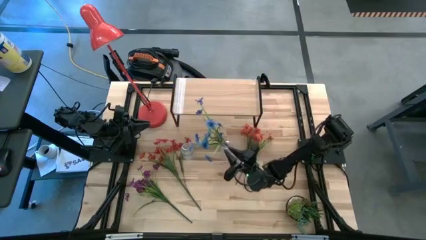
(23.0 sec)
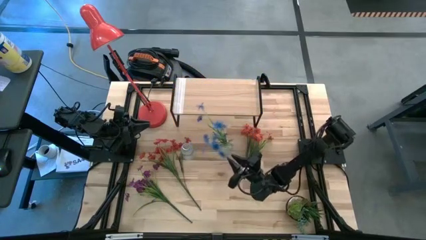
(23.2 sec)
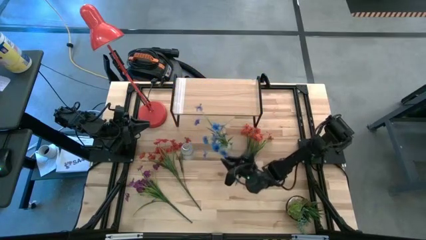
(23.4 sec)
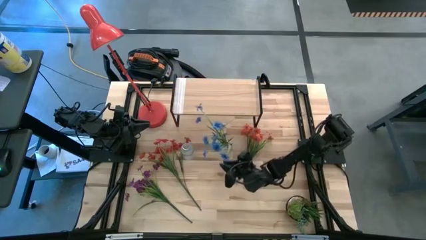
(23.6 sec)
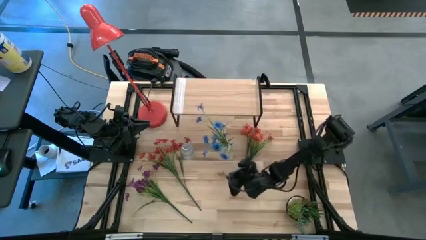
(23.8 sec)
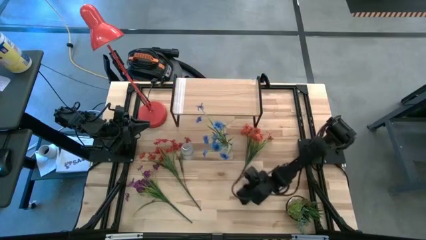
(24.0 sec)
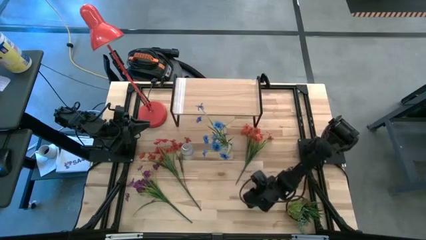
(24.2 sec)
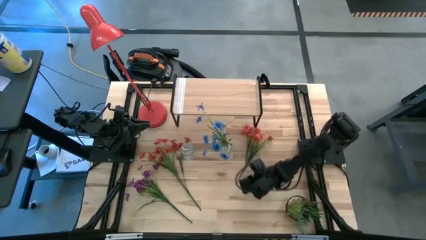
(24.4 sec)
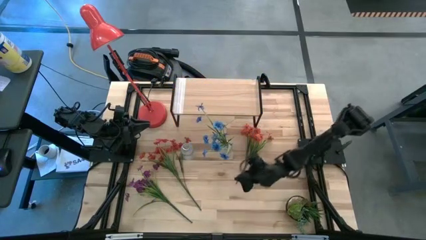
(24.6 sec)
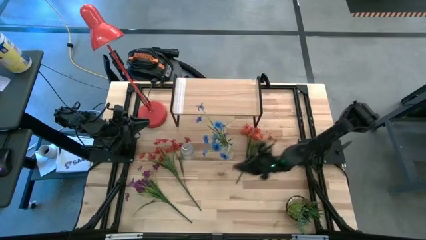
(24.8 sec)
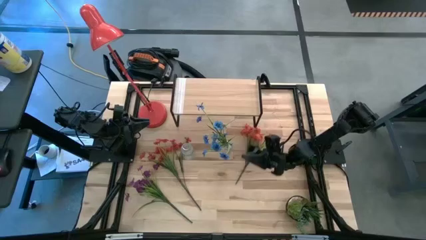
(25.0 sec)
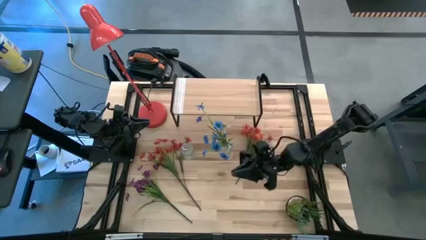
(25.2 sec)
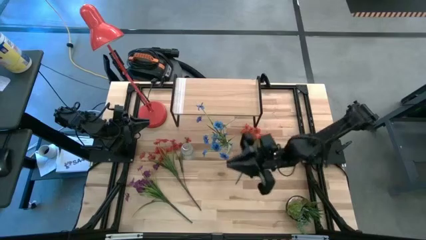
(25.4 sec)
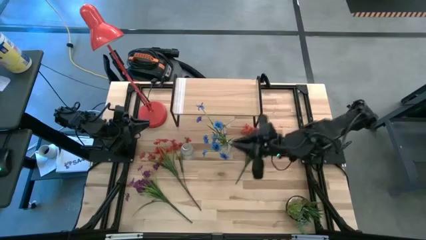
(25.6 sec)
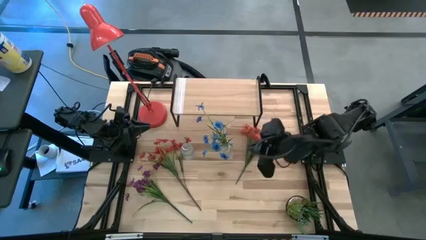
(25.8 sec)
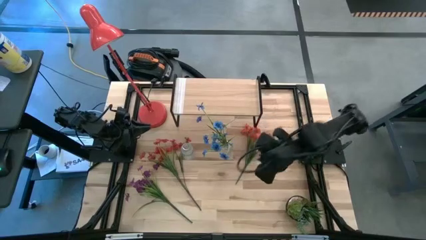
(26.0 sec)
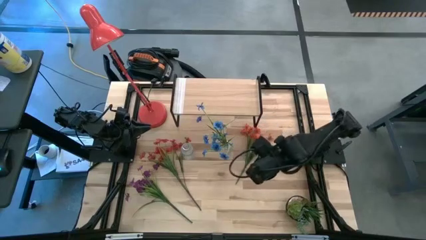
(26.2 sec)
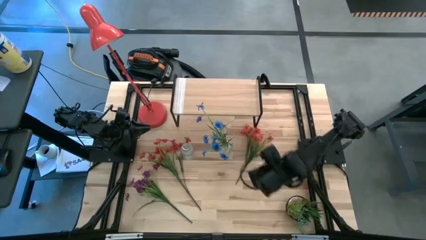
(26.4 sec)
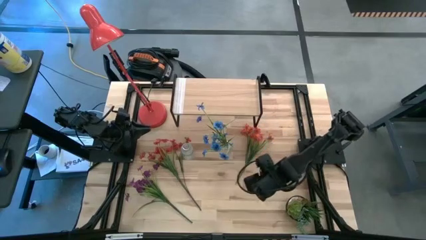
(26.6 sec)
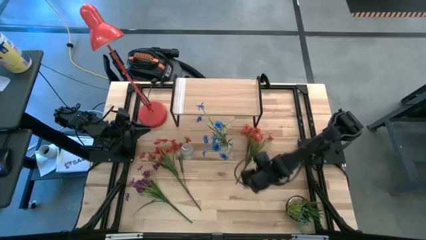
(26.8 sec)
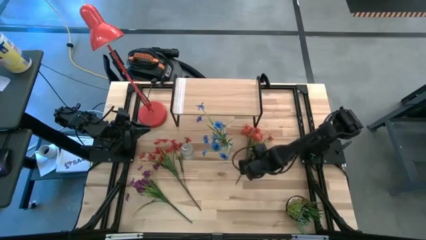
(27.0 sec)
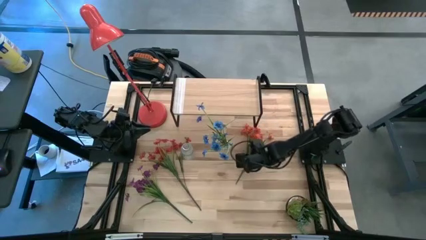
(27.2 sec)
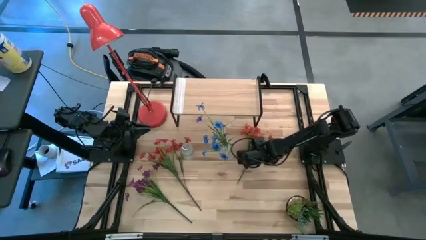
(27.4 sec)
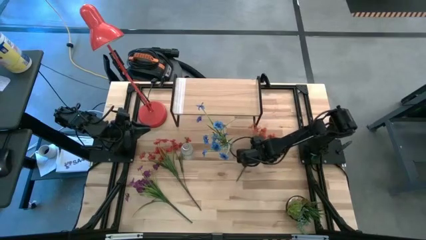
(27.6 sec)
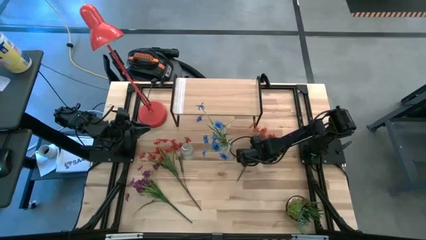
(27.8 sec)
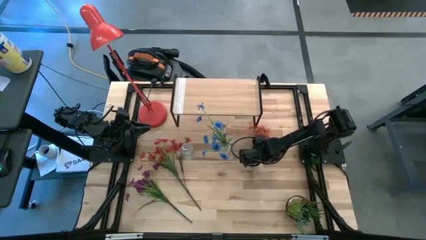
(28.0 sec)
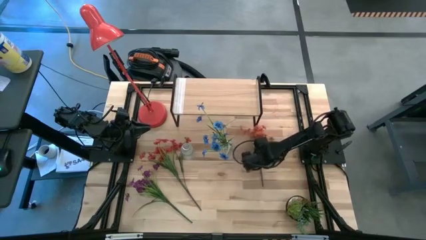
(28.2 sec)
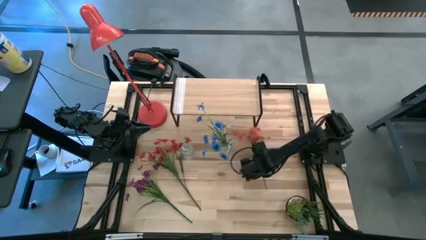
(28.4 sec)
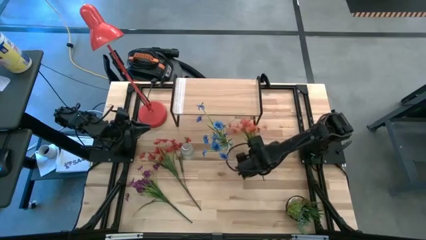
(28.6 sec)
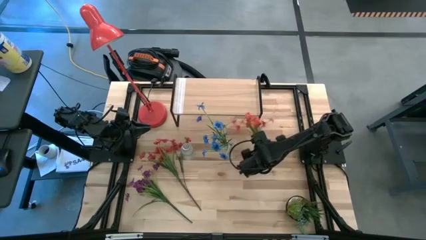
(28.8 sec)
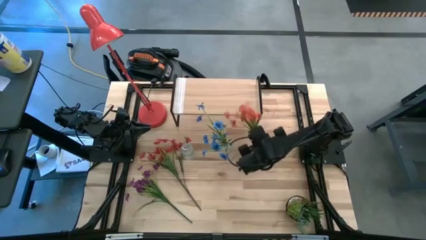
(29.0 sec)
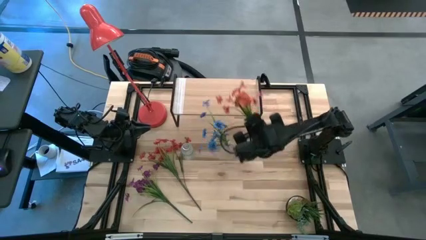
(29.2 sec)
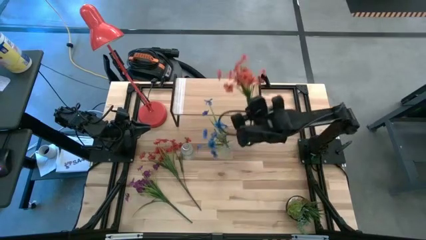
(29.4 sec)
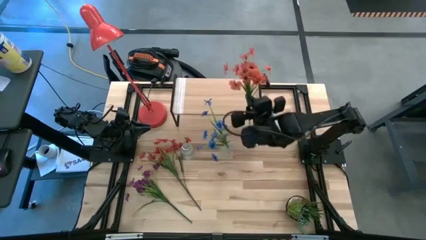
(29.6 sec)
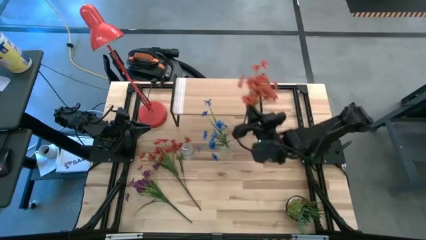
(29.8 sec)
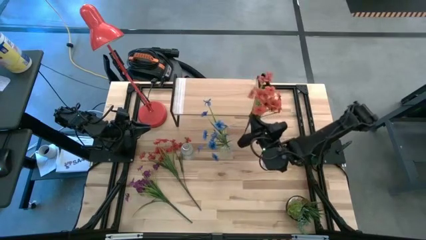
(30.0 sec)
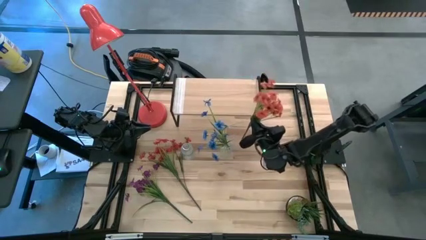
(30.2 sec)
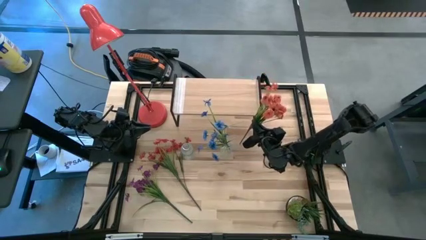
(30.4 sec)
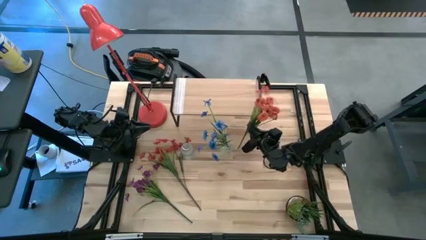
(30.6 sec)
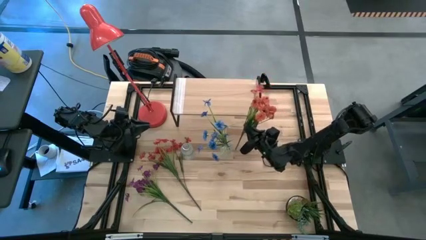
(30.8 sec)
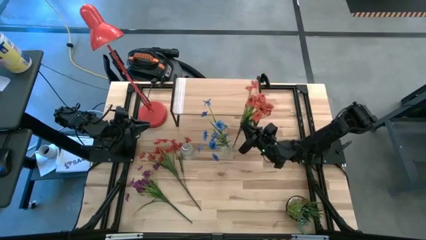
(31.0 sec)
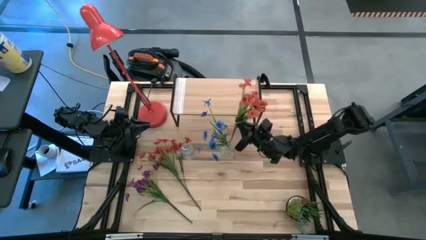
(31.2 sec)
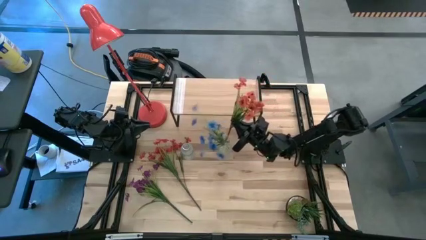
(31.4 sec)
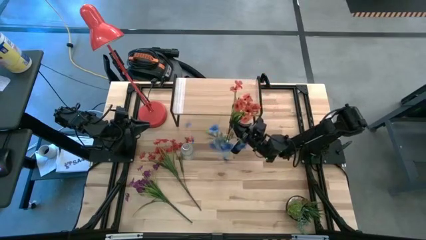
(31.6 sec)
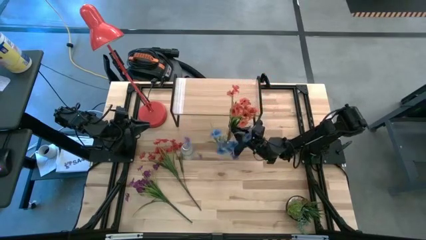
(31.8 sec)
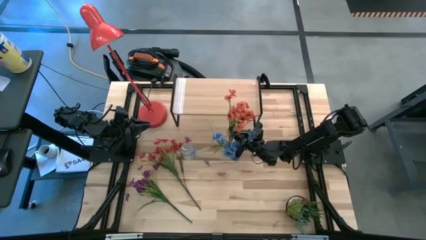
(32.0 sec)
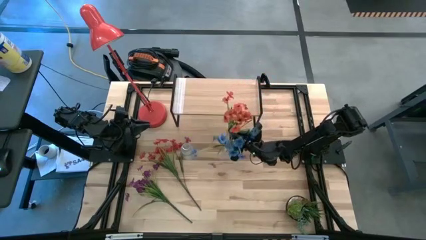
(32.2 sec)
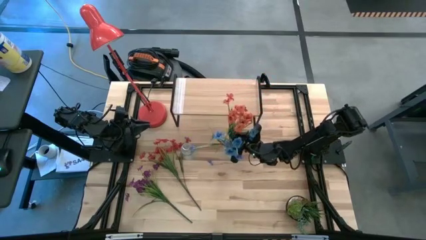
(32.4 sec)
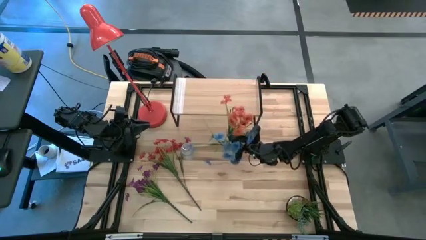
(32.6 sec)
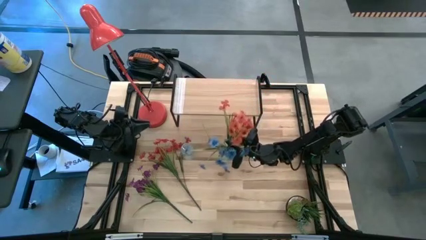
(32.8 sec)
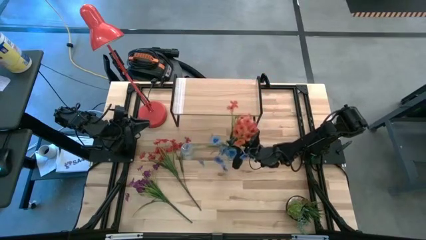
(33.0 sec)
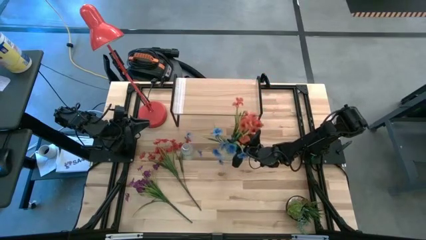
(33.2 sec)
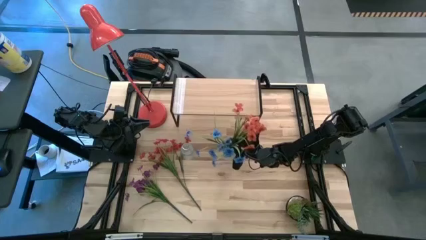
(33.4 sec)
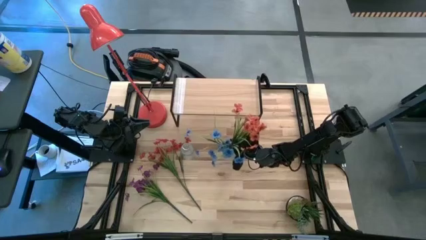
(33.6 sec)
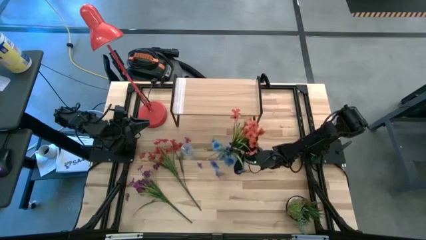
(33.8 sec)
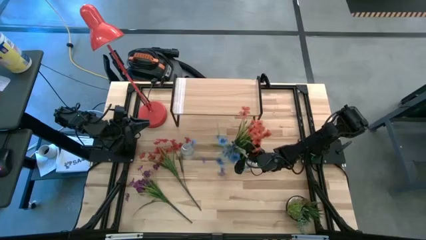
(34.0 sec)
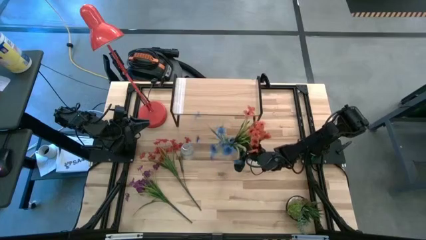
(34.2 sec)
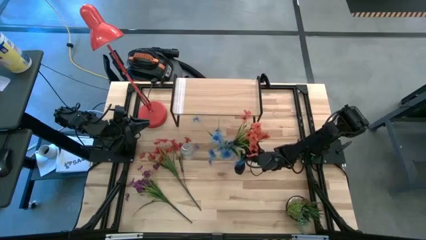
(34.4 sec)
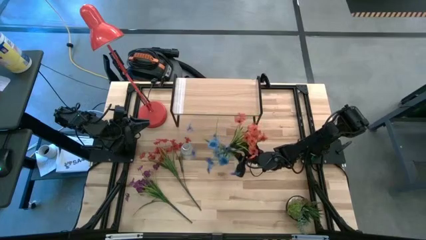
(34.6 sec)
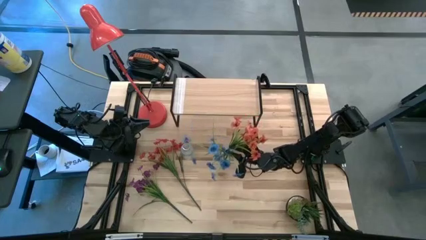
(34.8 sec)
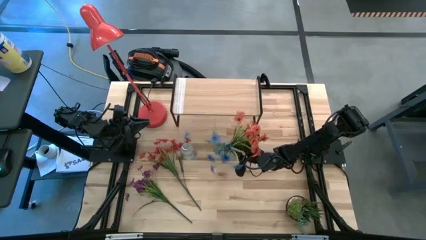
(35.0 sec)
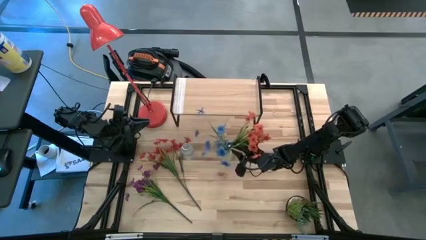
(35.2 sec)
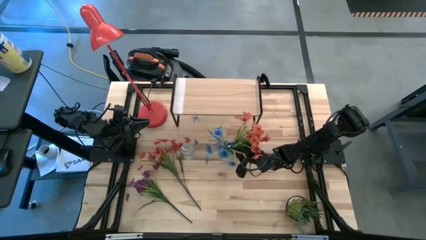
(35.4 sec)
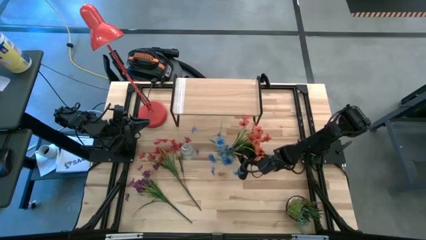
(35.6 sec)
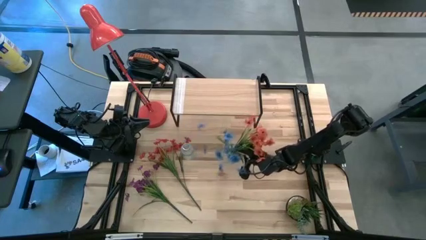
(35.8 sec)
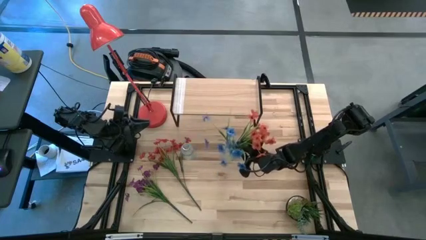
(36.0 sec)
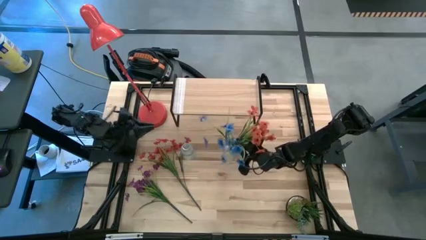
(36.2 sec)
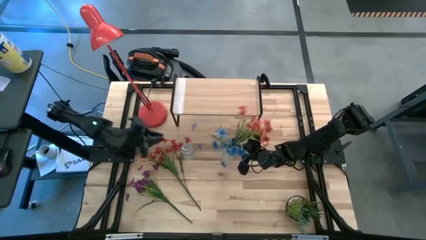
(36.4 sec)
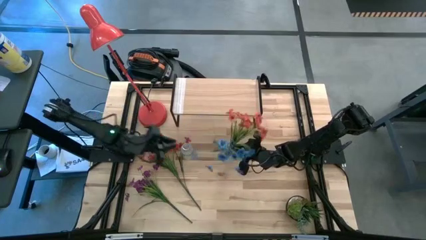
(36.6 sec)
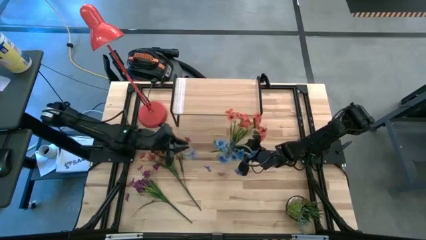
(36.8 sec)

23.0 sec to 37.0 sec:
Task: Pick and place flowers into a vace then onto a shelf
Put the right orange flowers into the right transparent flower vase
